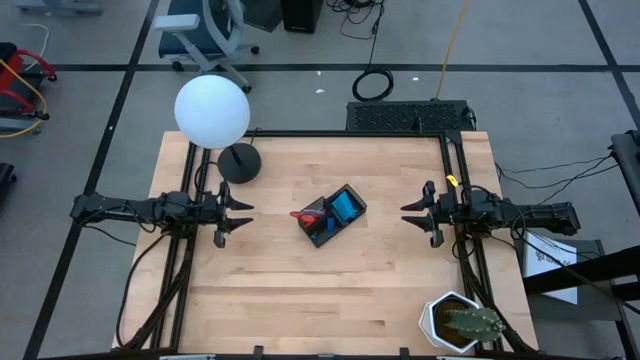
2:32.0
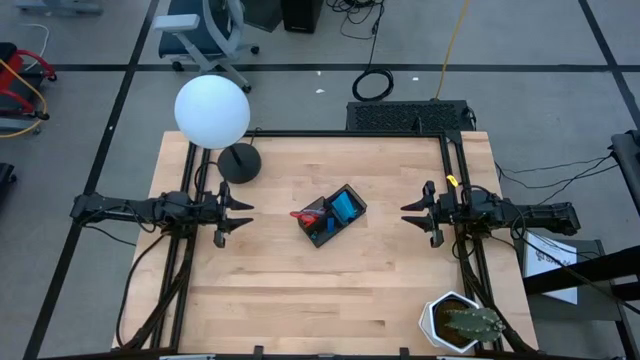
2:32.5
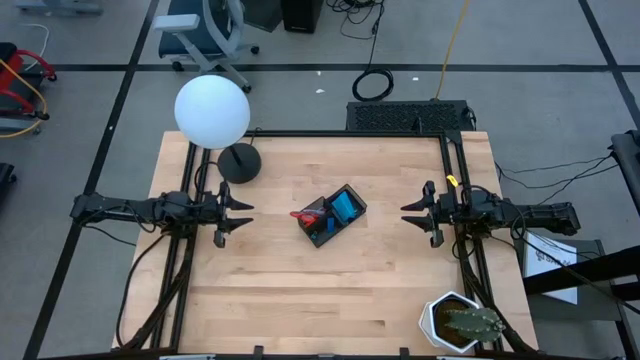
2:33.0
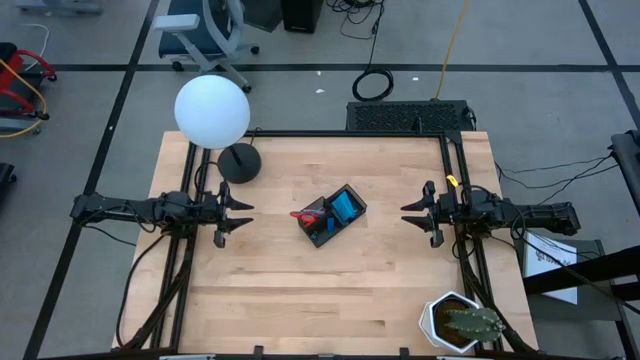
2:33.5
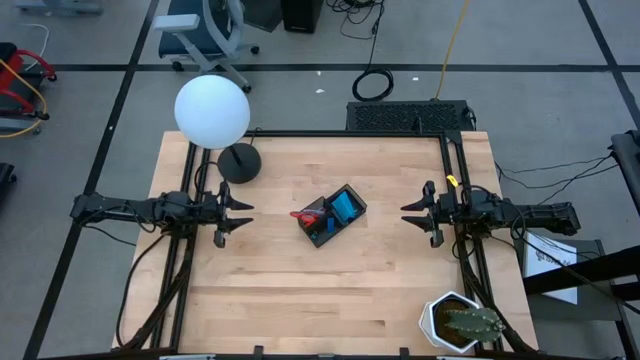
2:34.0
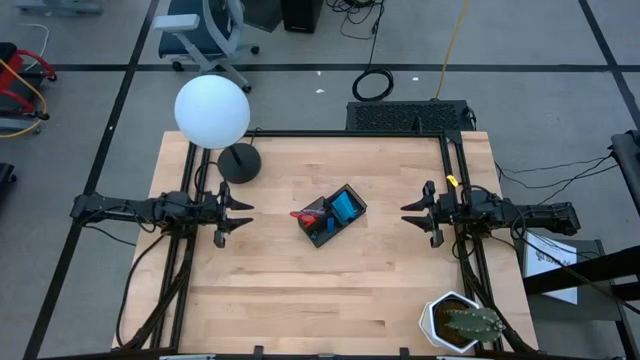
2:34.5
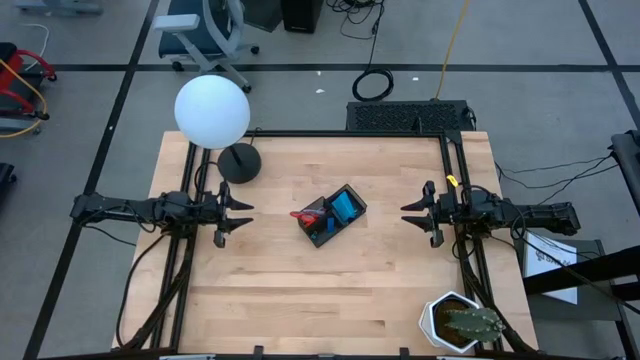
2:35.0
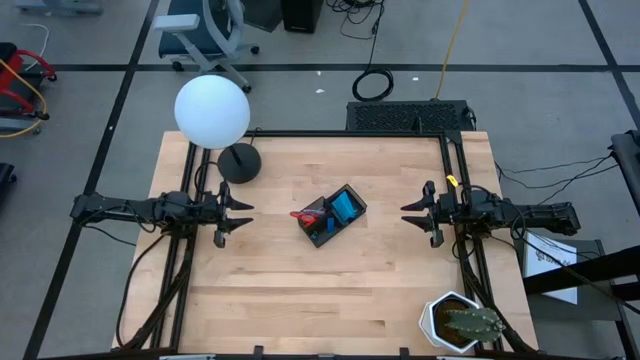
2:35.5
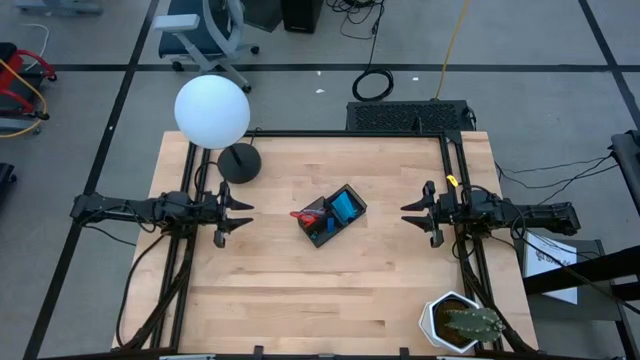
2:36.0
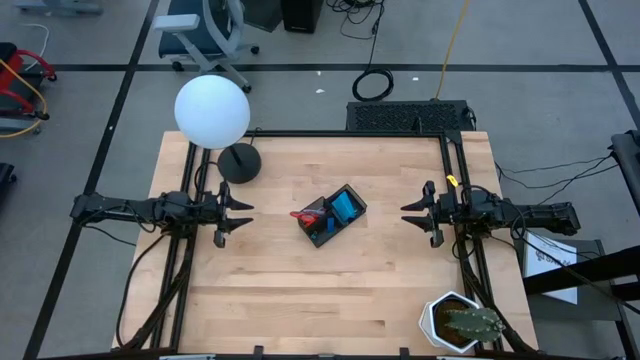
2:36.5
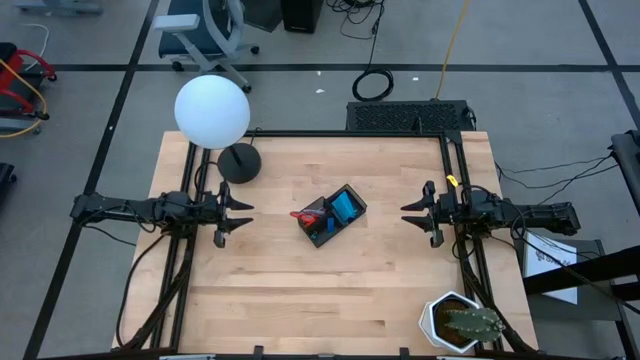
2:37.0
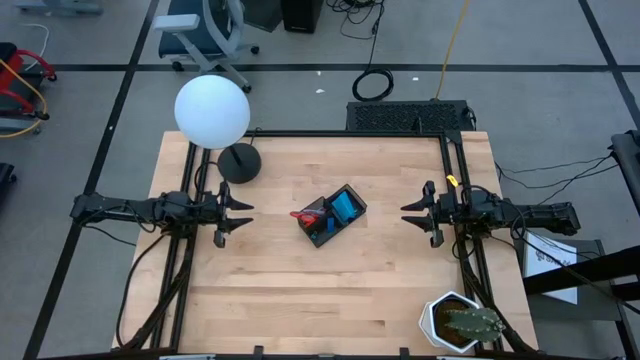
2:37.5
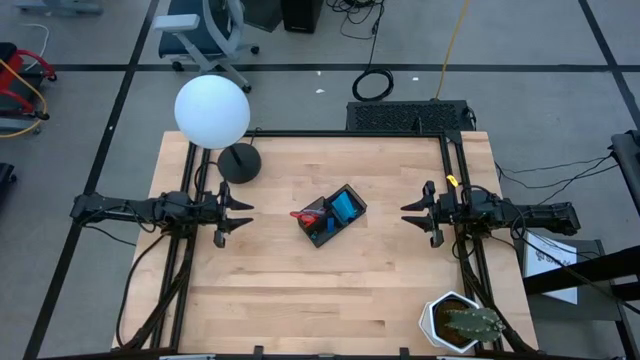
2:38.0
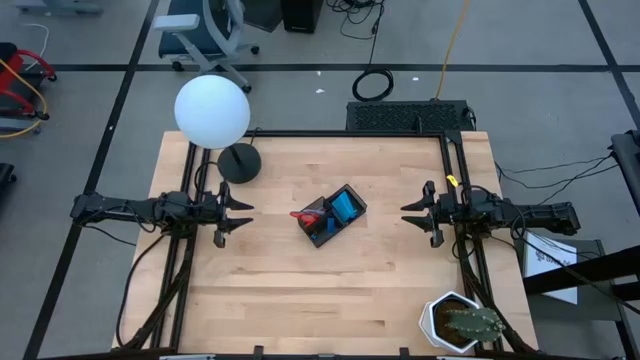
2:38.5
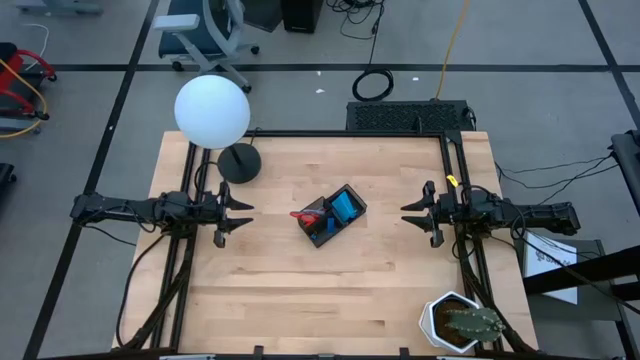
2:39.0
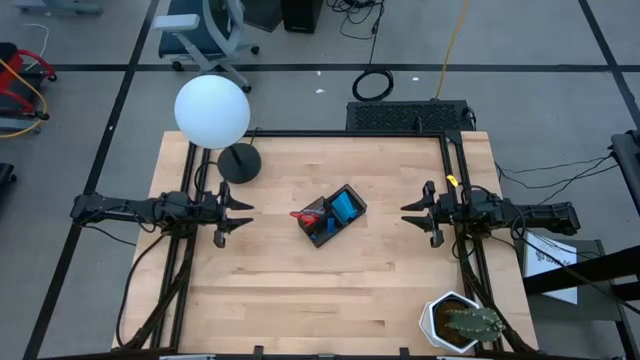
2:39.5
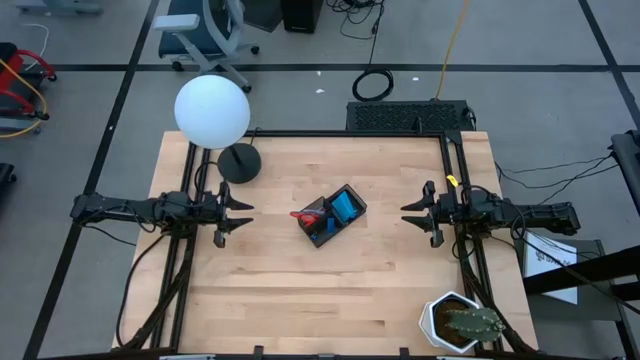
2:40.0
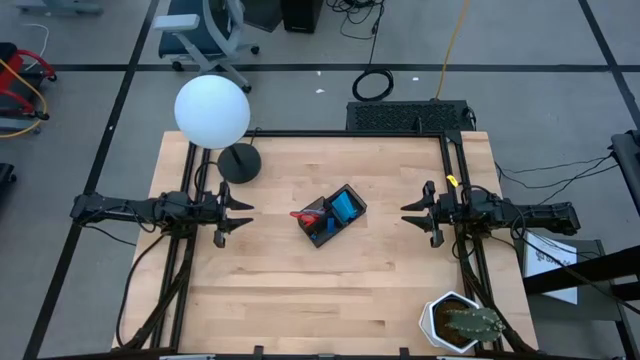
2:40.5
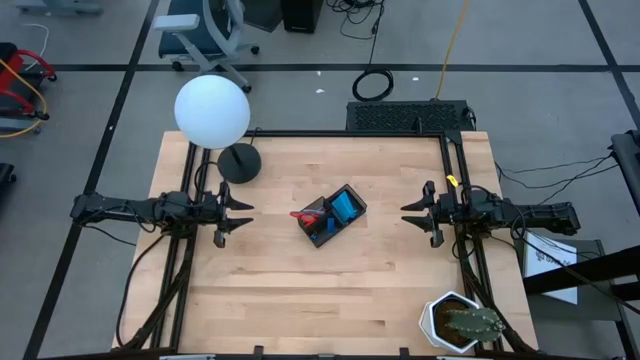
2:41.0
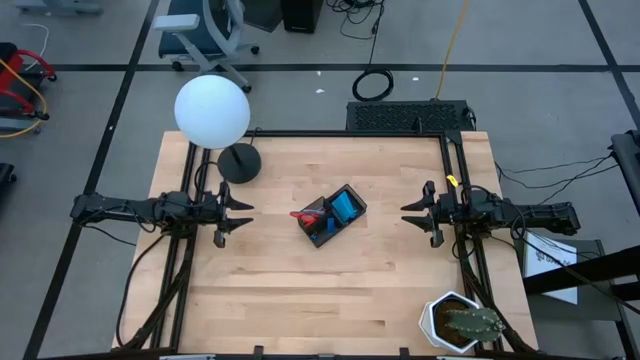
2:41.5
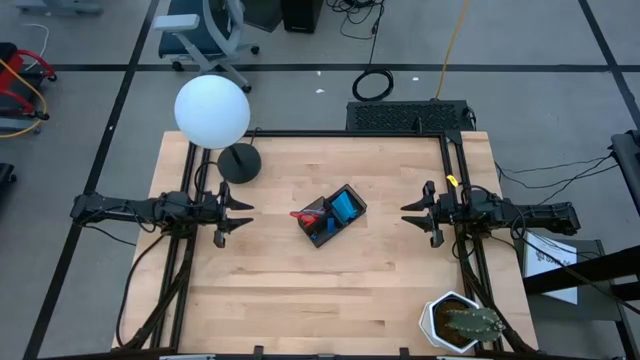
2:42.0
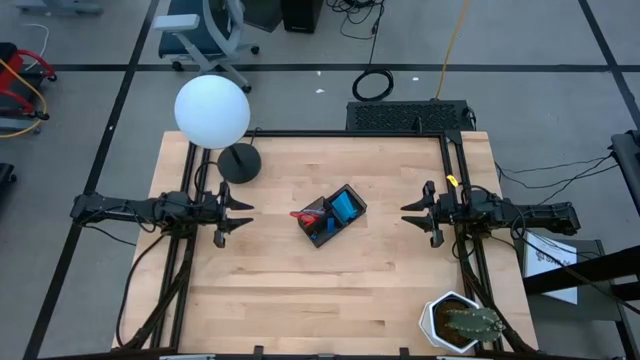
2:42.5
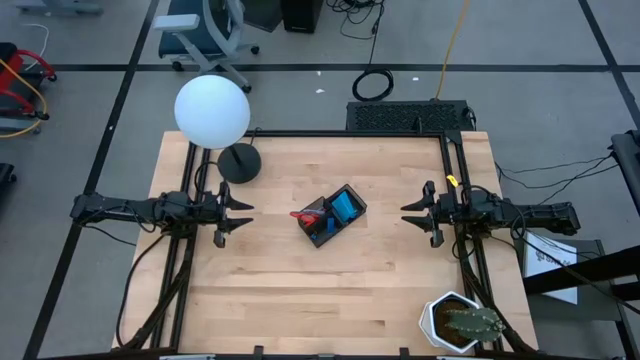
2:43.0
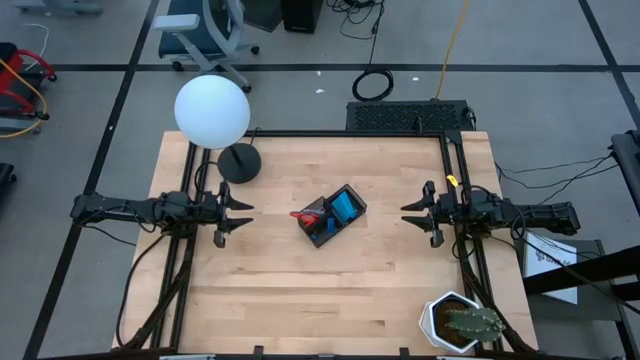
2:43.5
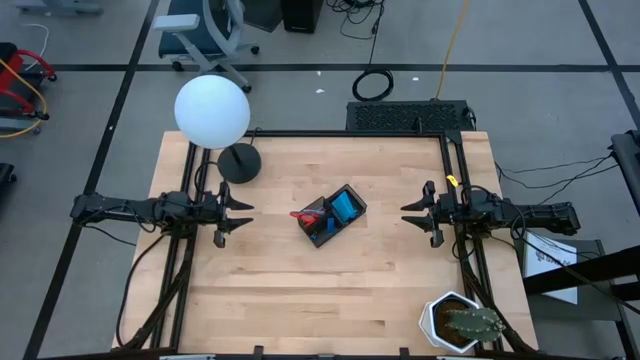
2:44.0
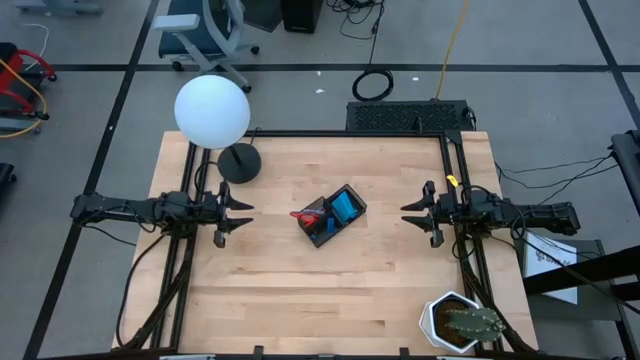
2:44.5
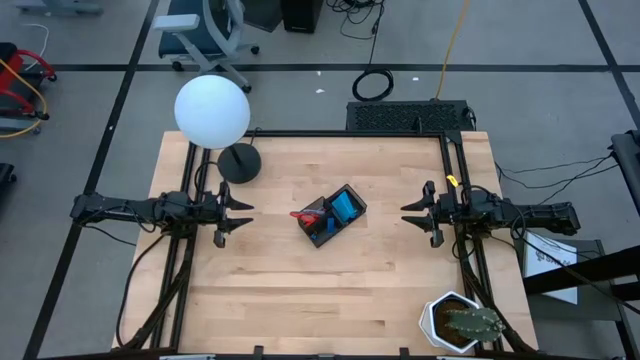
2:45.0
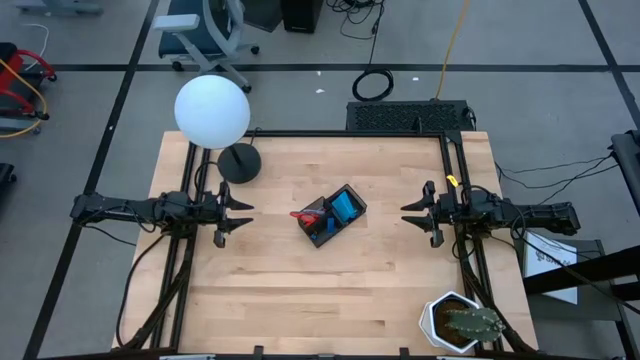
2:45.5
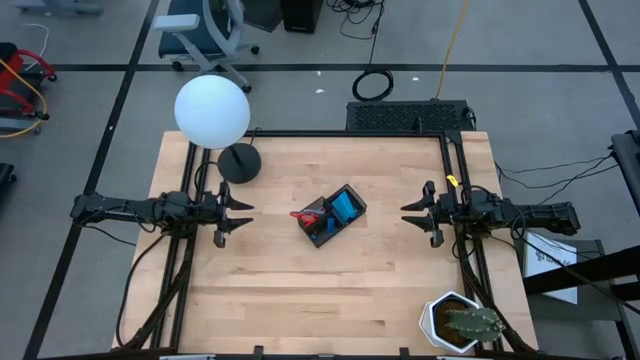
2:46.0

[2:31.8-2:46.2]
Task: Pick and place office supplies into organizer
Return to Home Position

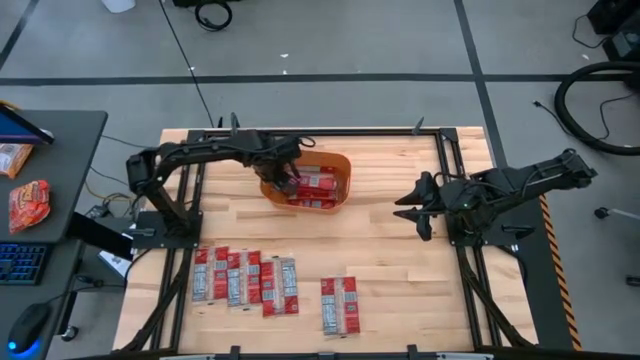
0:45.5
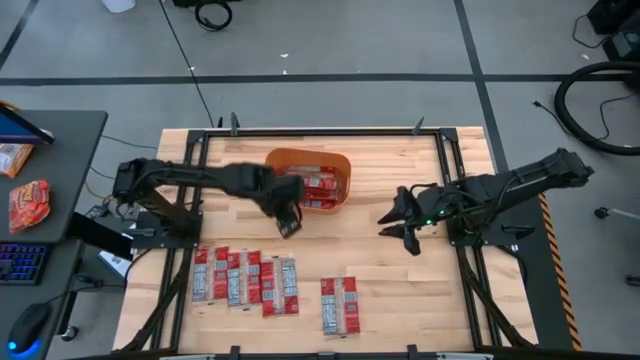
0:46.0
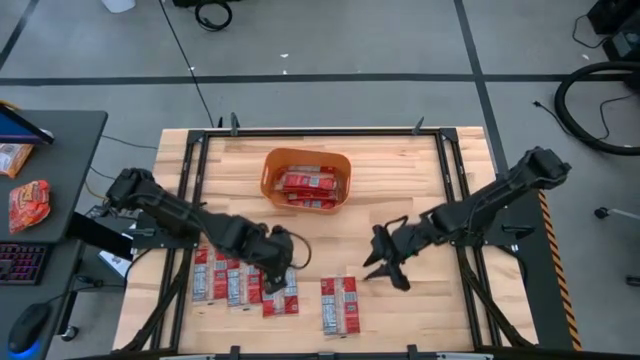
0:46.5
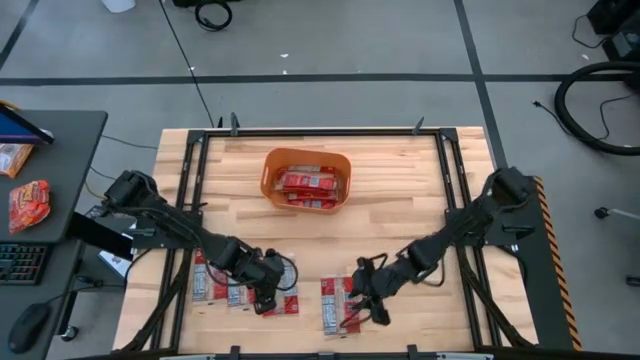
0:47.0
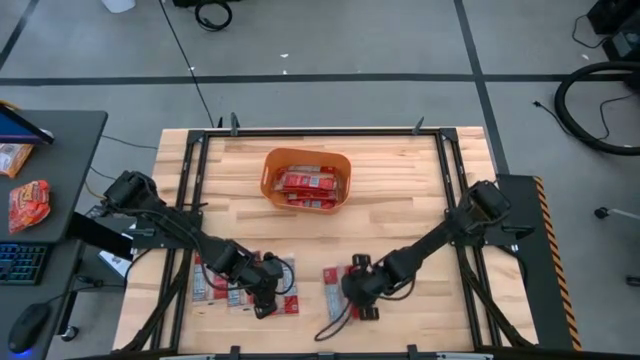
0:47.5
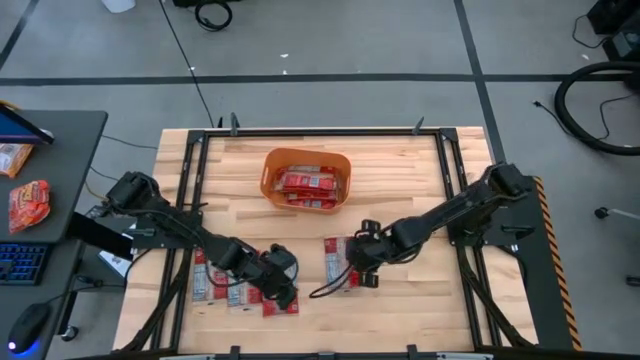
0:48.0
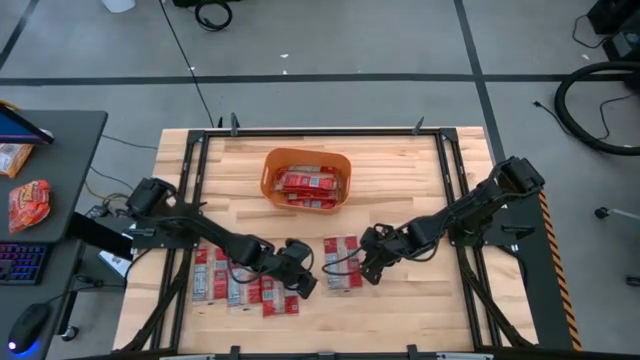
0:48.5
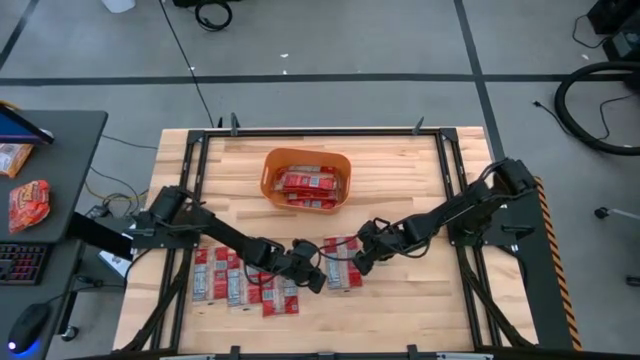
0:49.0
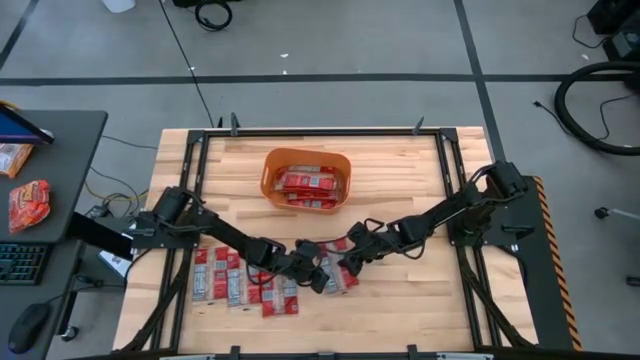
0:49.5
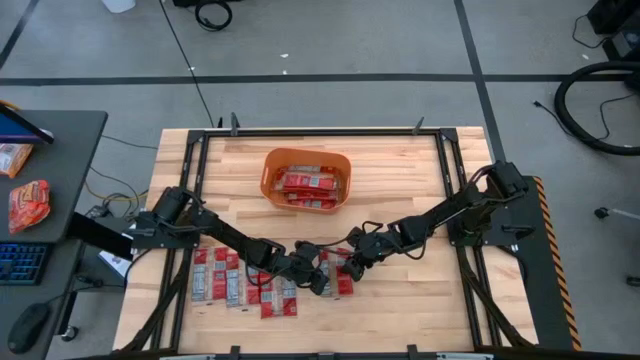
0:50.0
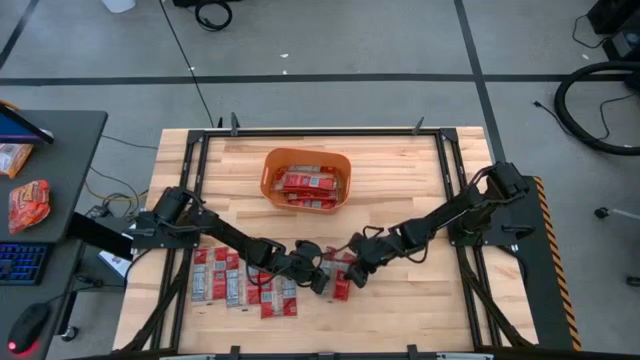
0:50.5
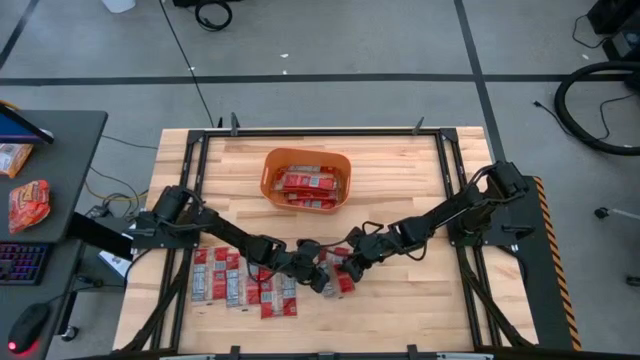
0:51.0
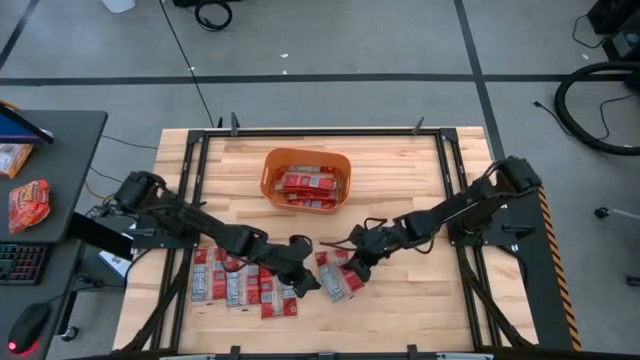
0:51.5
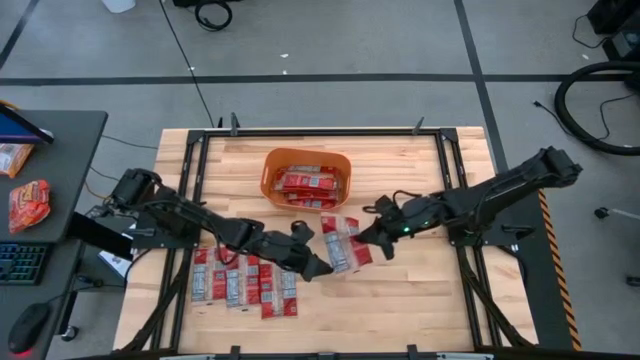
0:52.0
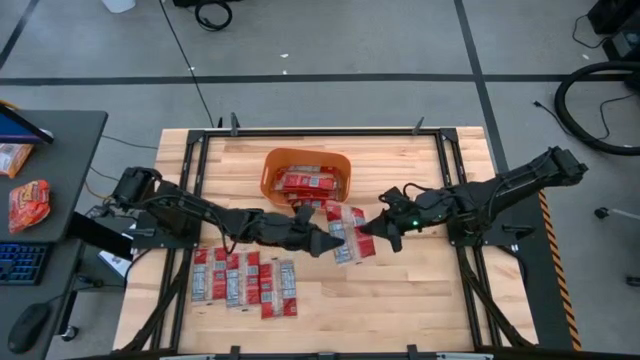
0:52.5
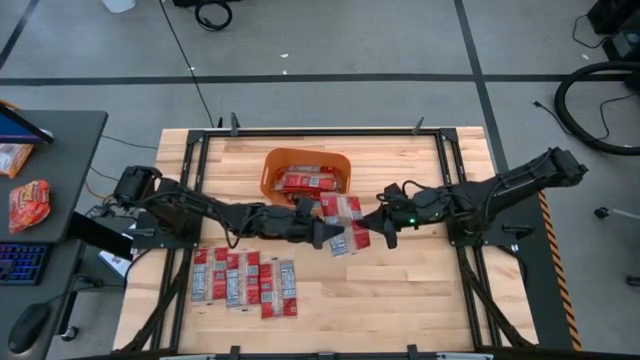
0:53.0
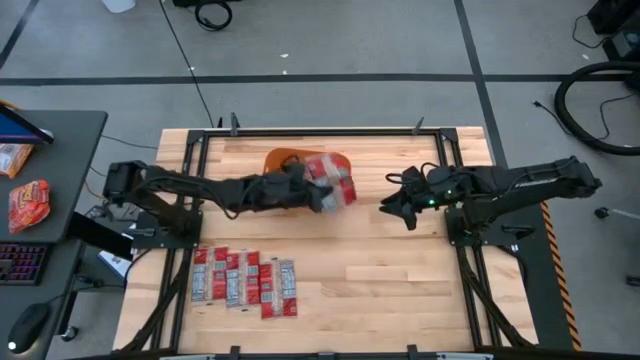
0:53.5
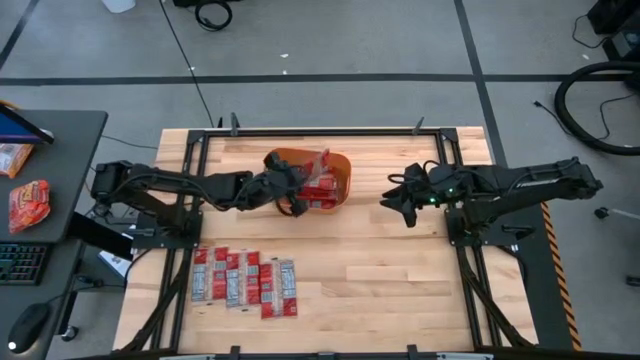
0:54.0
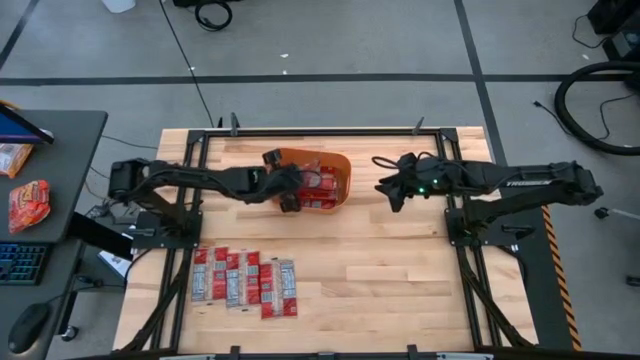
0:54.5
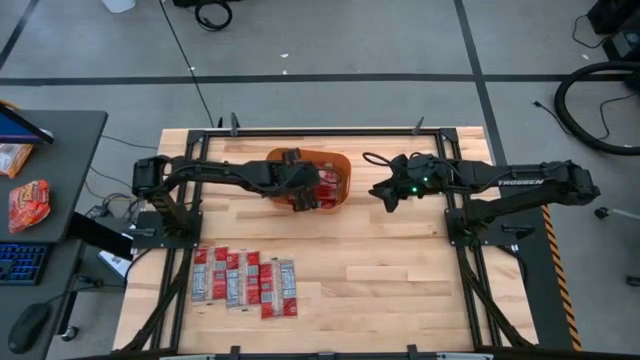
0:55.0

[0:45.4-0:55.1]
Task: Sort popcorn bags into baskets
Put the red popcorn bag into the orange bin
